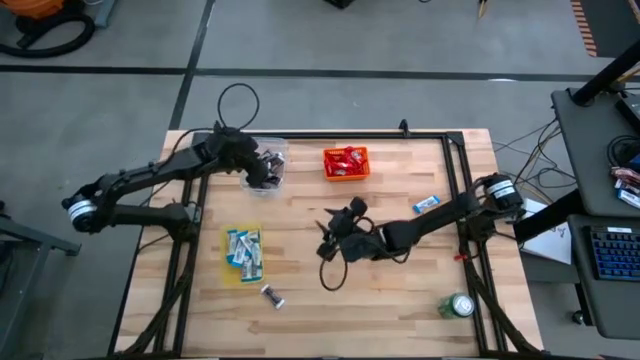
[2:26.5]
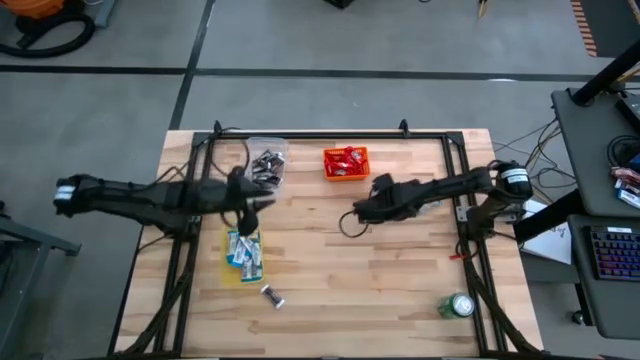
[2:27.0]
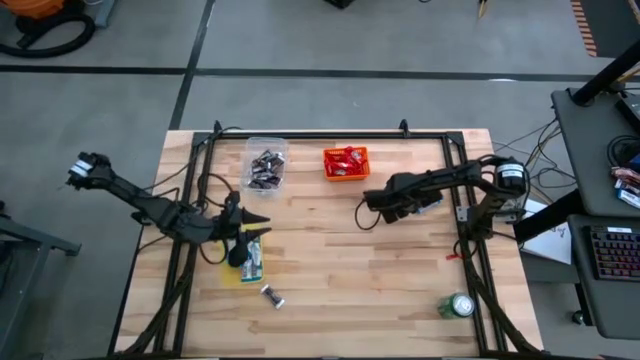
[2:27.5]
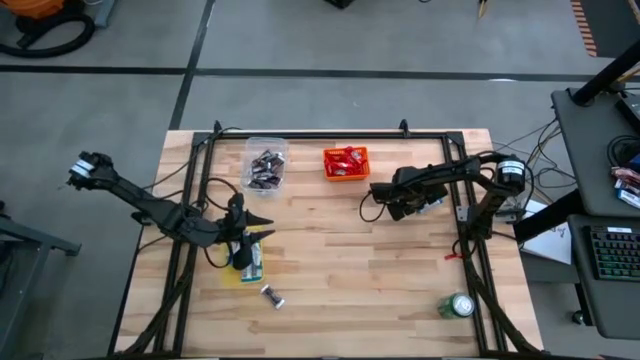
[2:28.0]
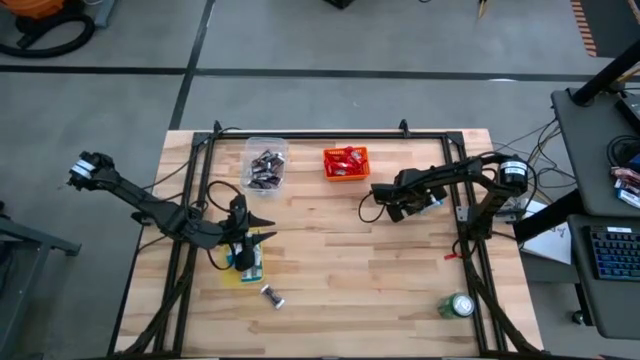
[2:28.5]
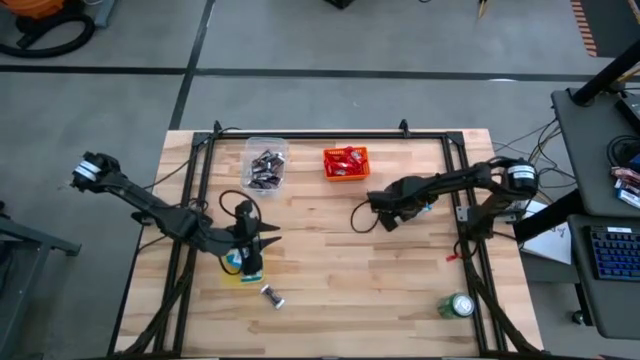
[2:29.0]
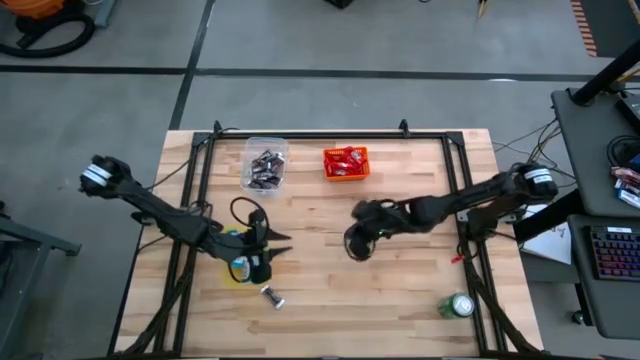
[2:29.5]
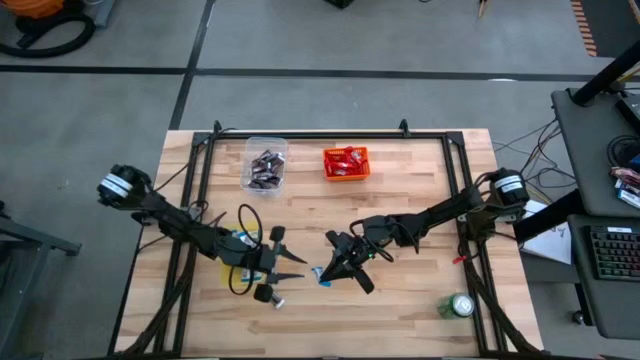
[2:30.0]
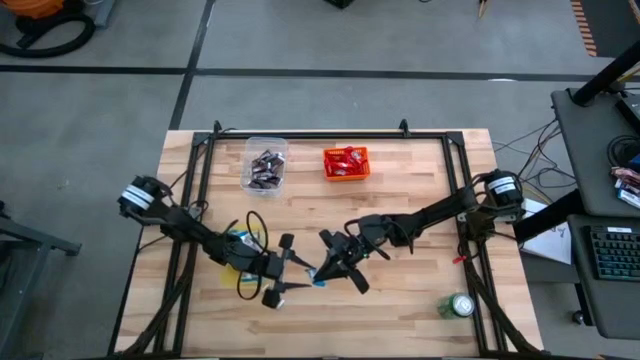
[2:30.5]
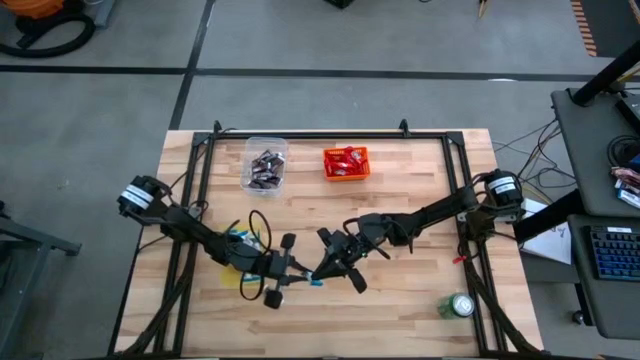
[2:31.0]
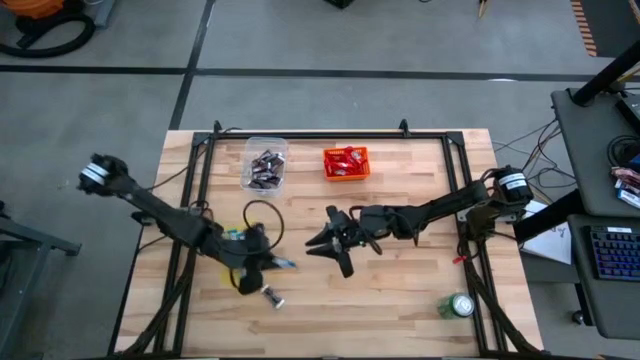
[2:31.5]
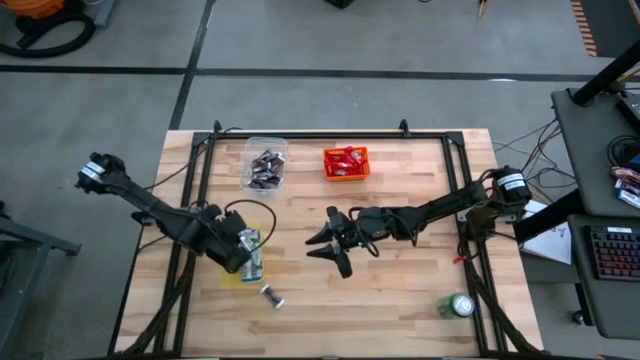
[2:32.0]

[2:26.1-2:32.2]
Task: Sort candy
Put the white candy into the yellow bin

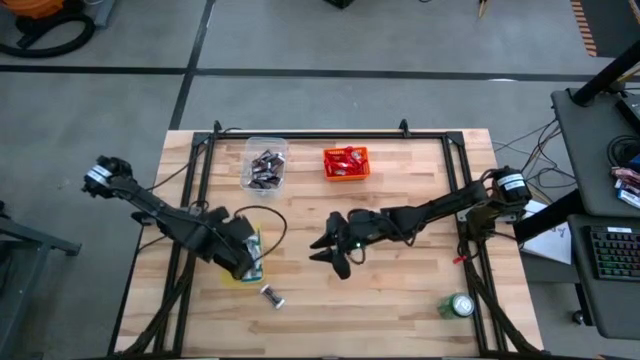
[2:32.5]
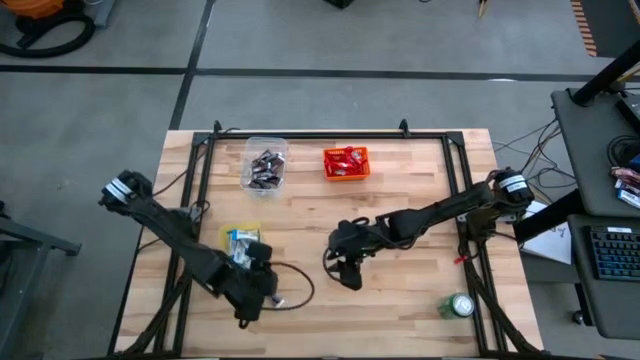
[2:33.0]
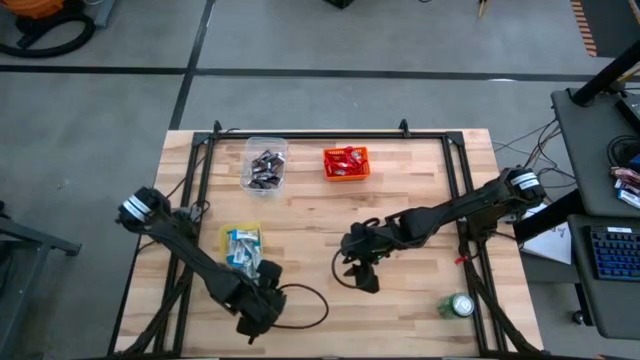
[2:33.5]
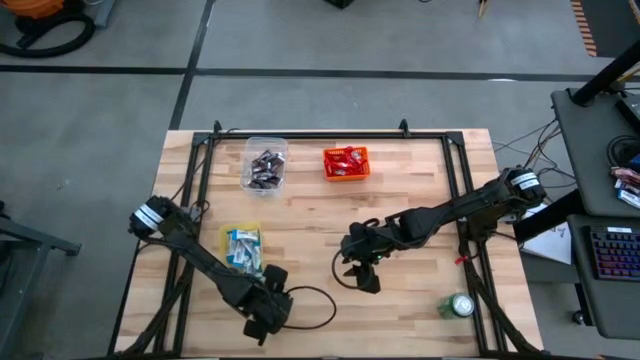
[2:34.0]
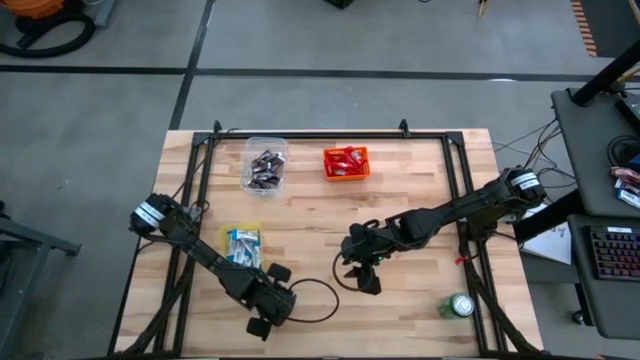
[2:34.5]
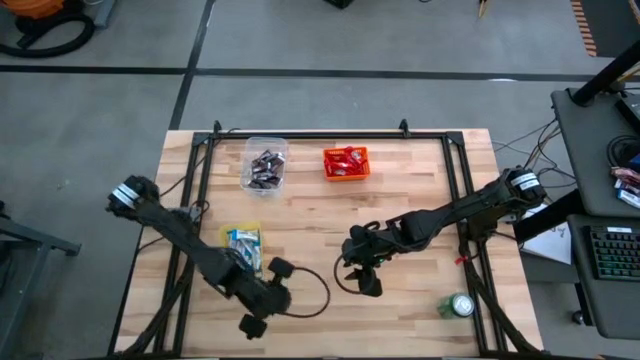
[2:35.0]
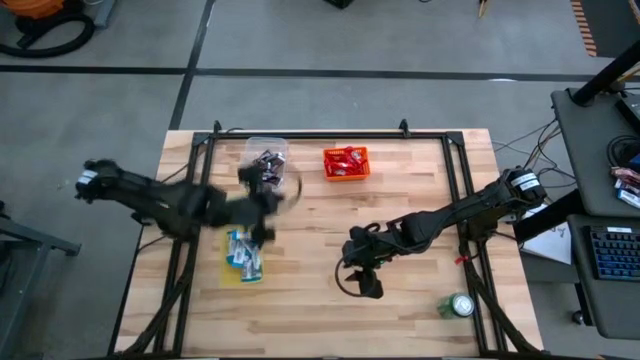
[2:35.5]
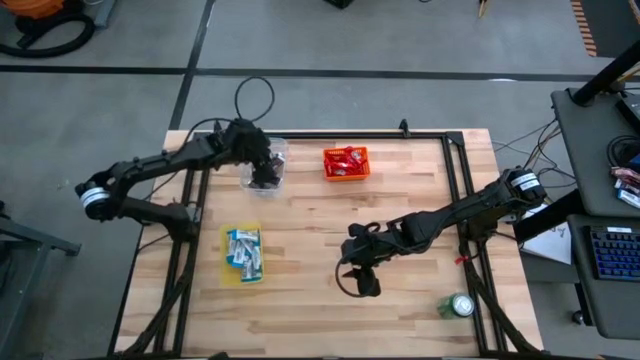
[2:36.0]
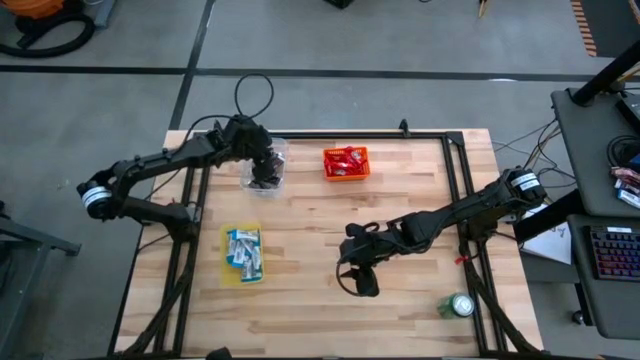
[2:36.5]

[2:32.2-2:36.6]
Put the brown candy into the transparent bin

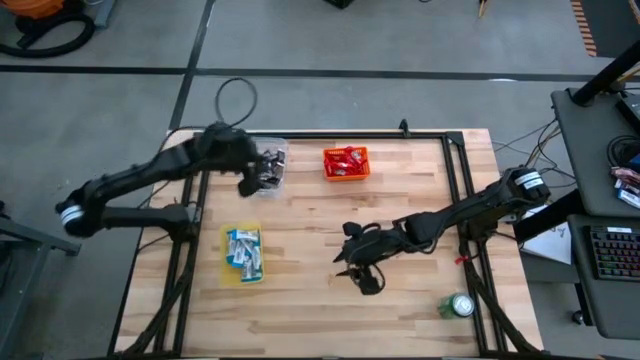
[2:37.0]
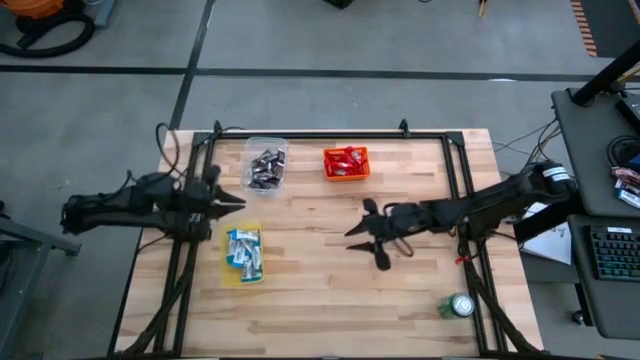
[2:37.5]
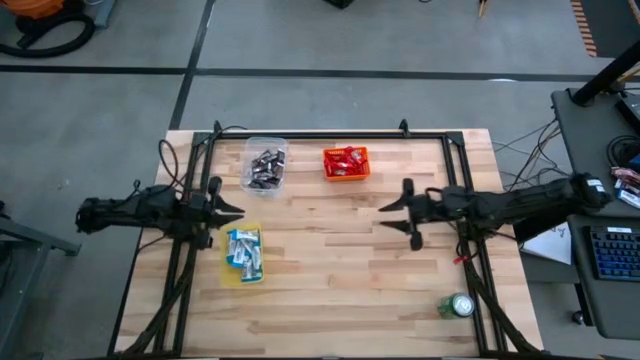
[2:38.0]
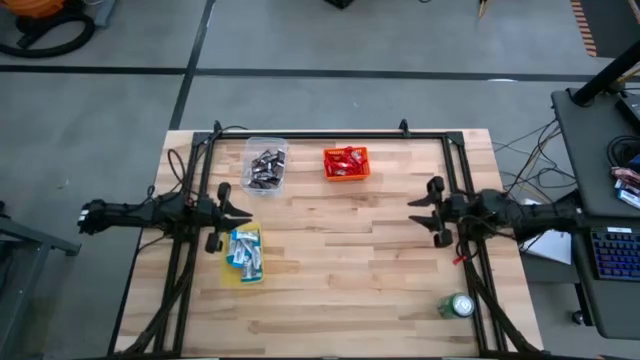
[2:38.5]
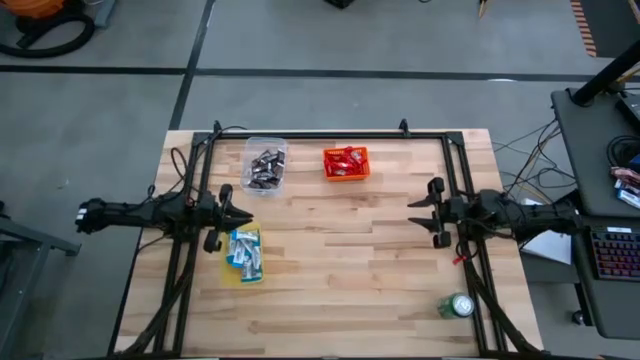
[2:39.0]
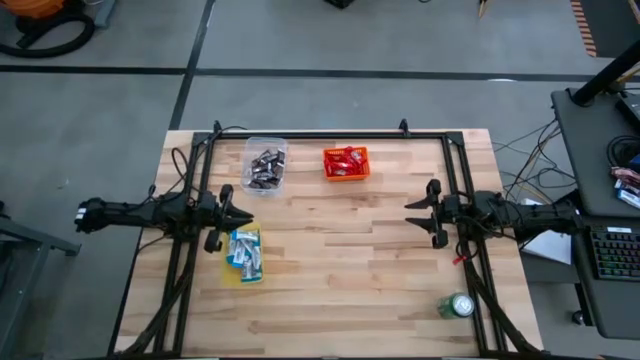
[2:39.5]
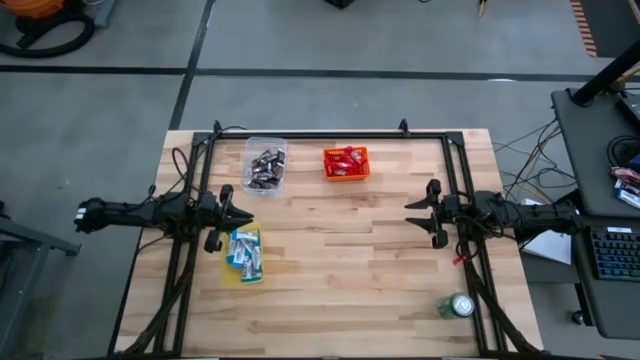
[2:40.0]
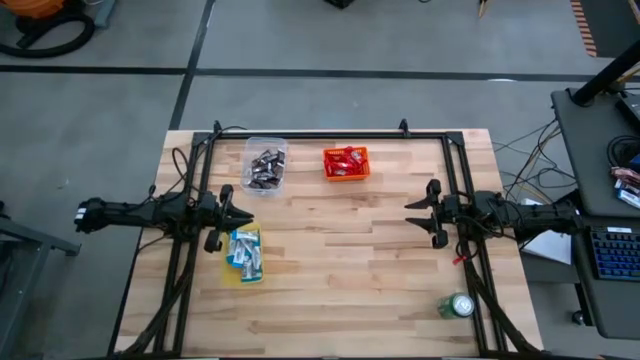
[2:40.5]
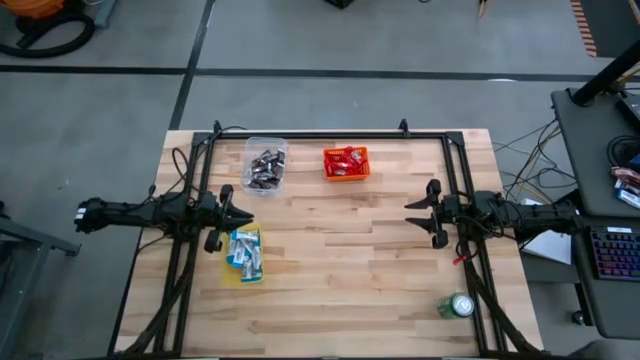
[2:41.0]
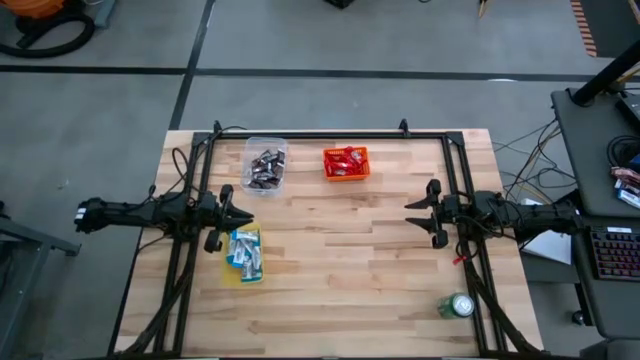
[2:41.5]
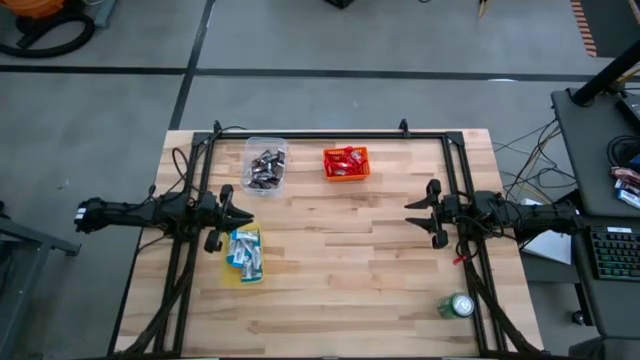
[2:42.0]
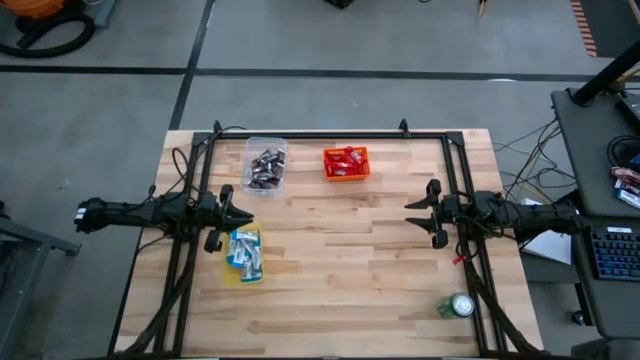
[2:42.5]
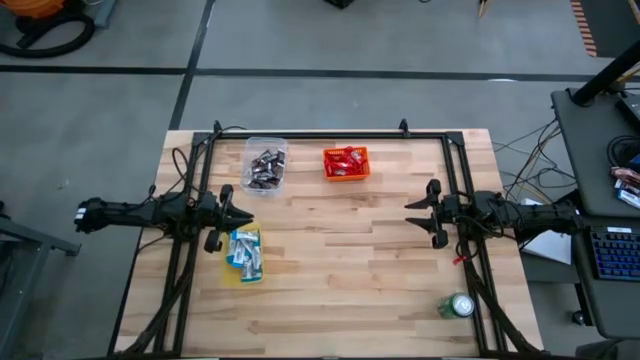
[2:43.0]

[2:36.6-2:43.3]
Return to Home Position

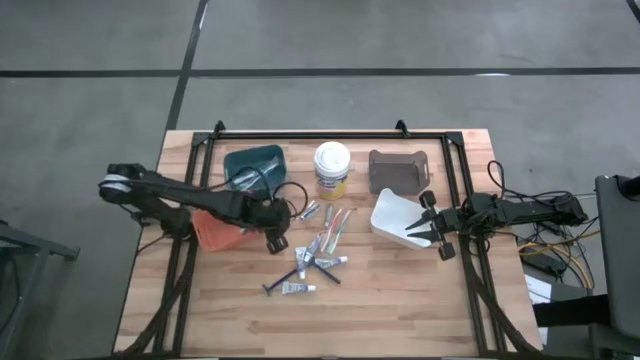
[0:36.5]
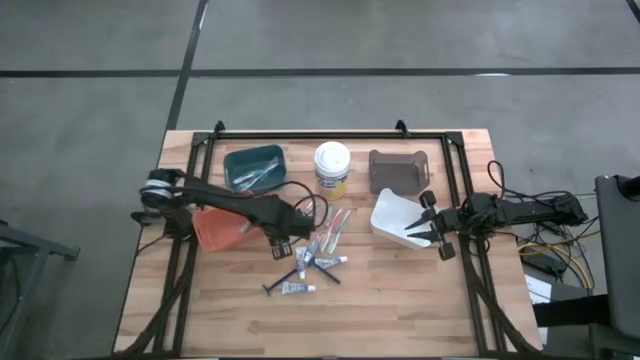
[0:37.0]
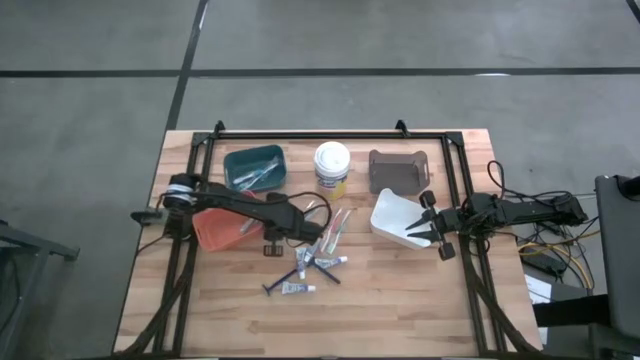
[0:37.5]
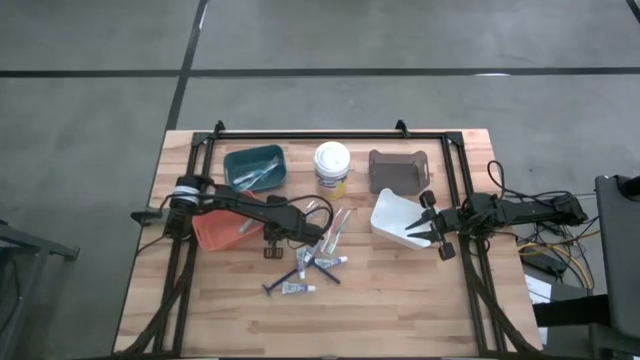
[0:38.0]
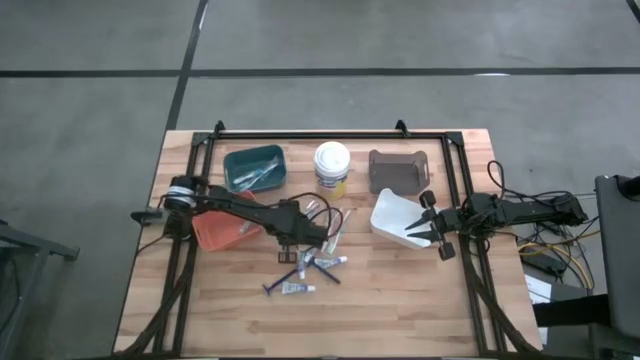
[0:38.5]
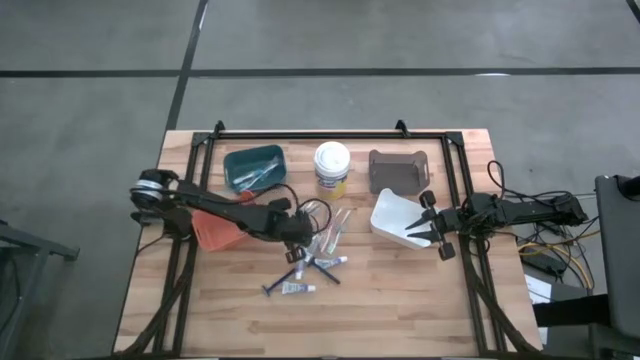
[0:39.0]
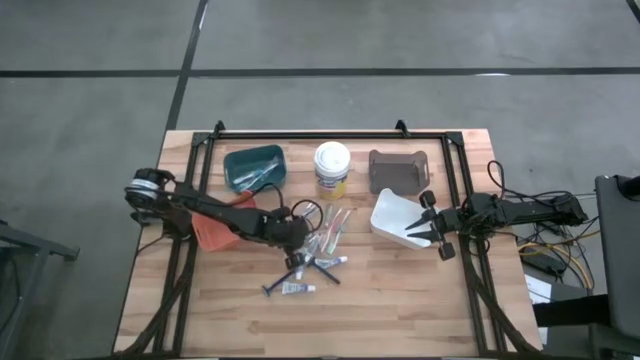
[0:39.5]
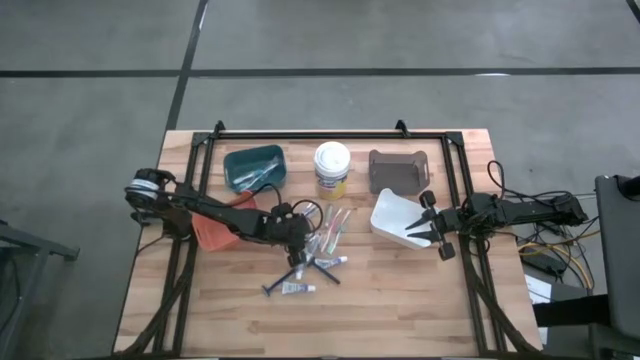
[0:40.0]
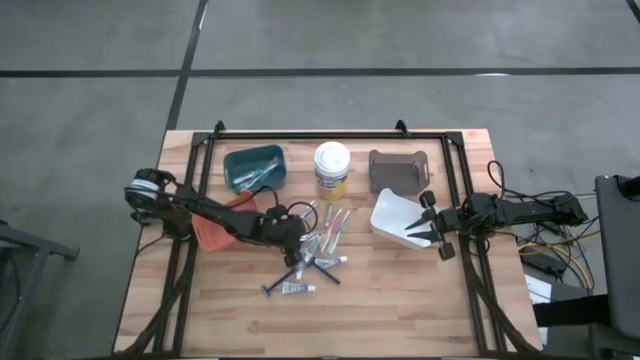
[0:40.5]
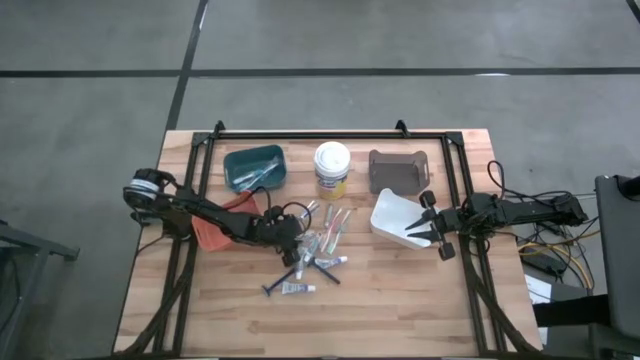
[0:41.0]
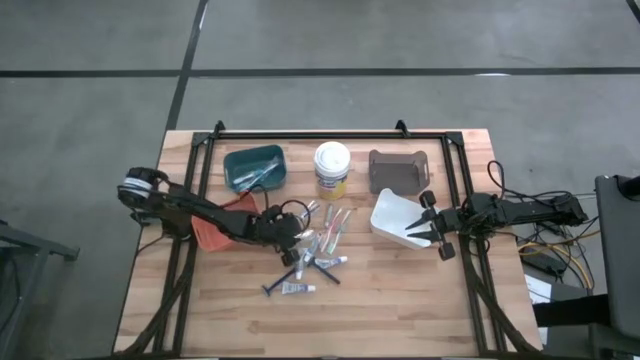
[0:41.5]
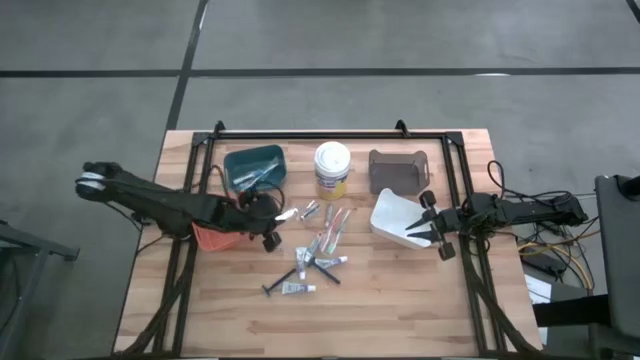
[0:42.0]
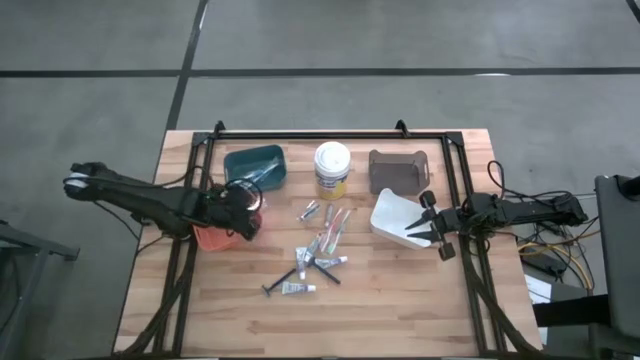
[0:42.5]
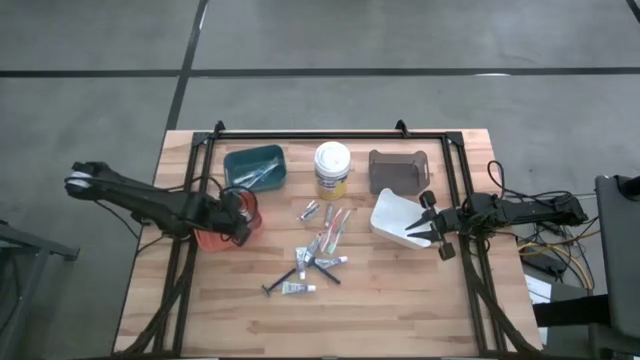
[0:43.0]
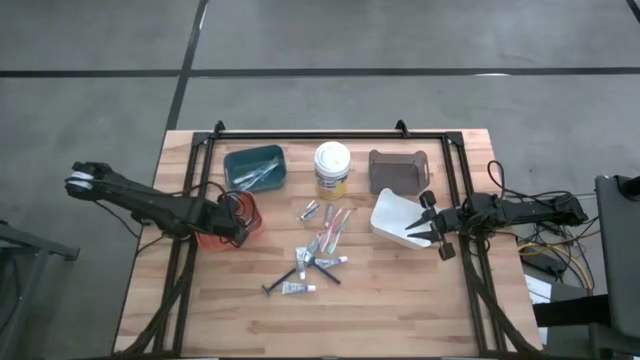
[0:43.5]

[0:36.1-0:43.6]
Task: Pick & Place Travel size toiletries
Put the left nail cutter into the orange bin
